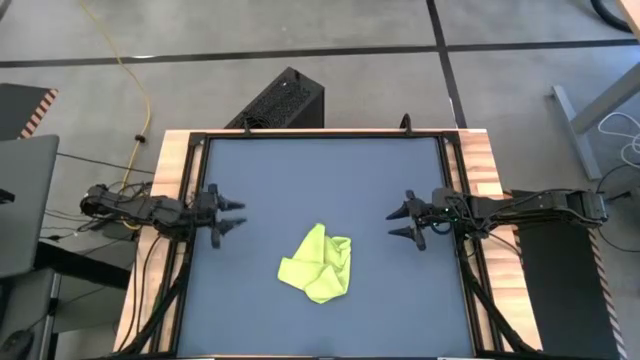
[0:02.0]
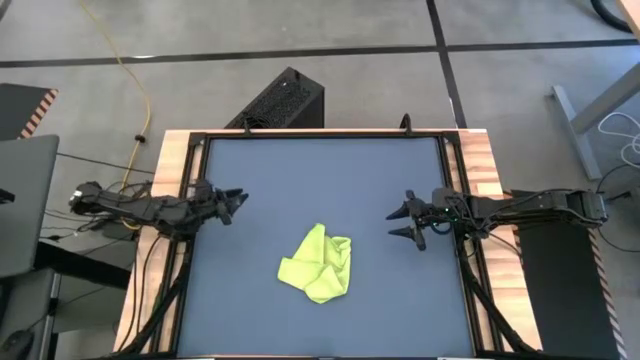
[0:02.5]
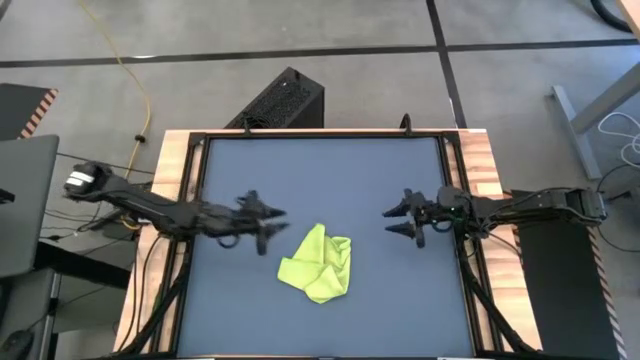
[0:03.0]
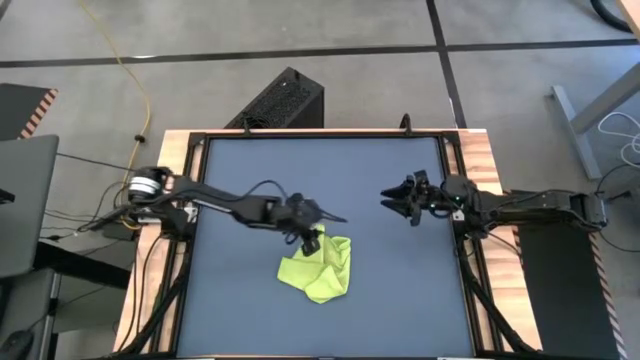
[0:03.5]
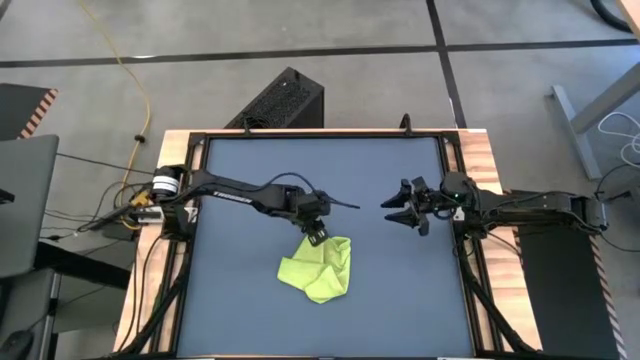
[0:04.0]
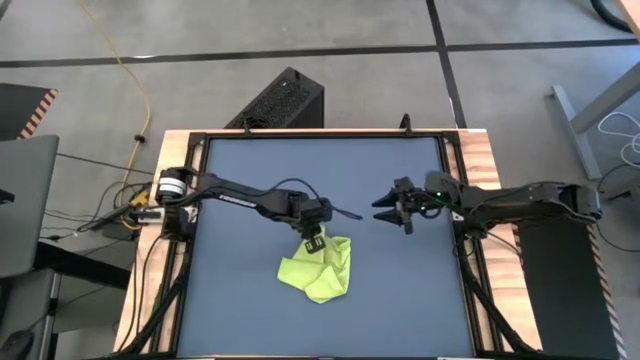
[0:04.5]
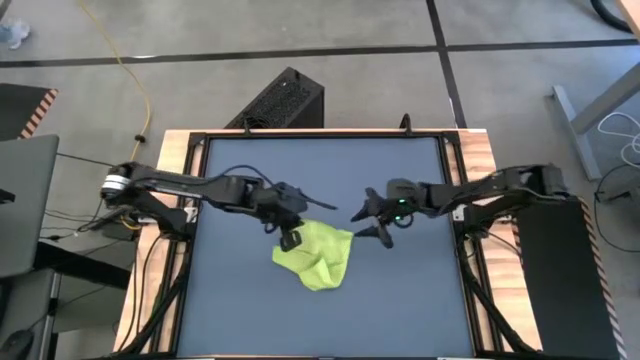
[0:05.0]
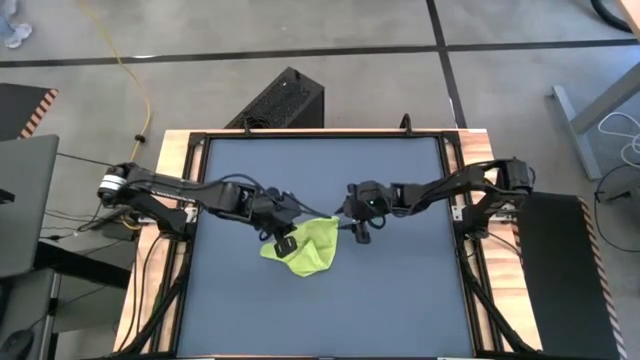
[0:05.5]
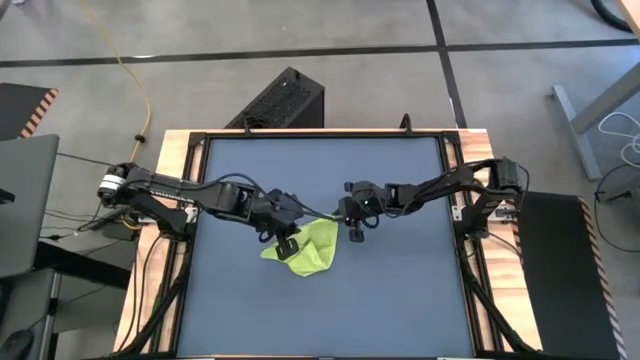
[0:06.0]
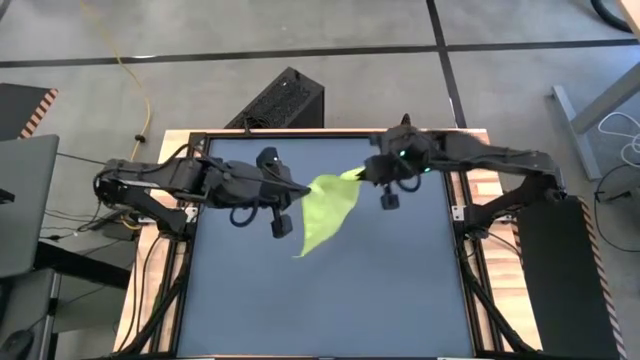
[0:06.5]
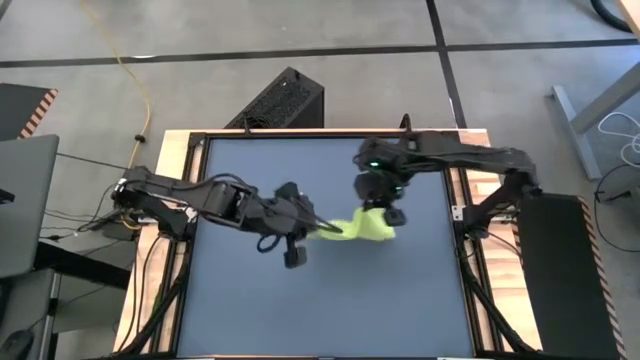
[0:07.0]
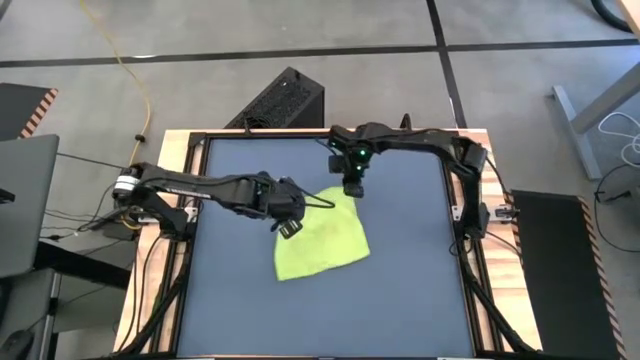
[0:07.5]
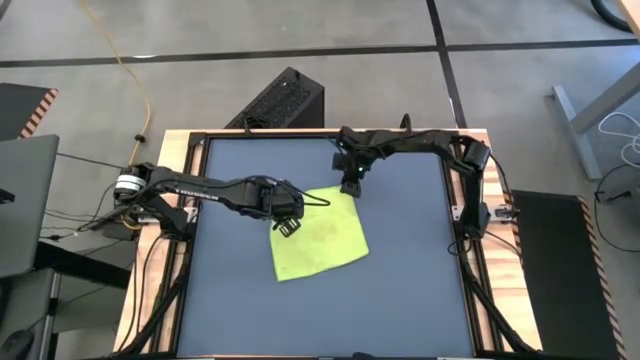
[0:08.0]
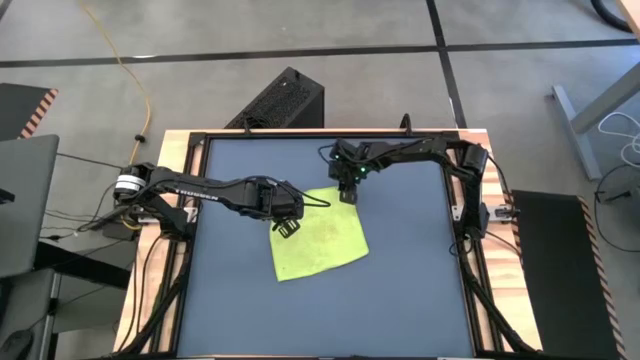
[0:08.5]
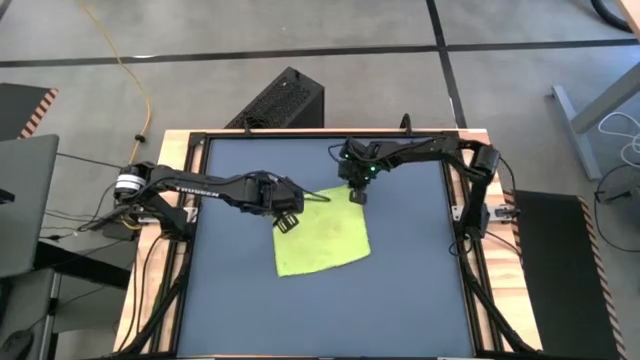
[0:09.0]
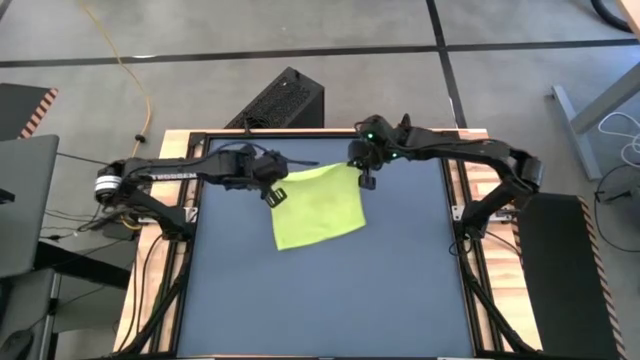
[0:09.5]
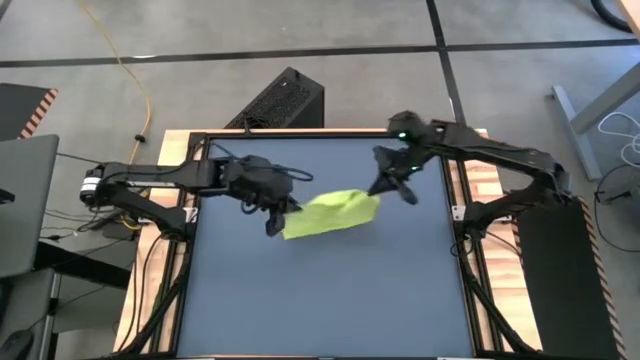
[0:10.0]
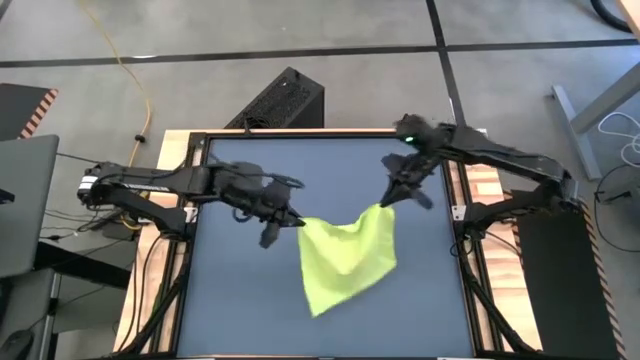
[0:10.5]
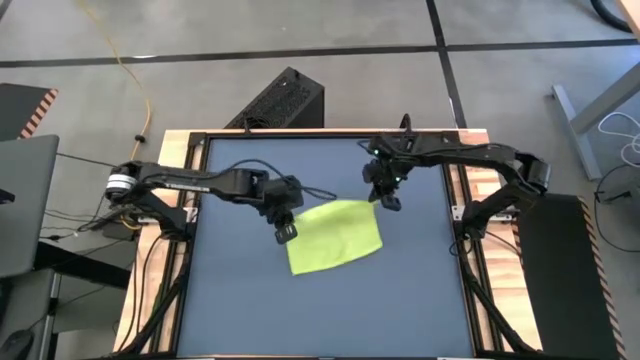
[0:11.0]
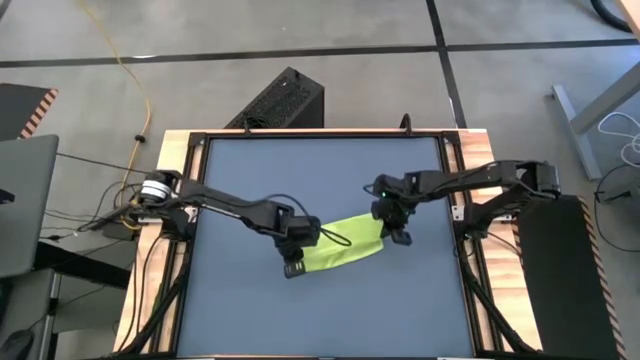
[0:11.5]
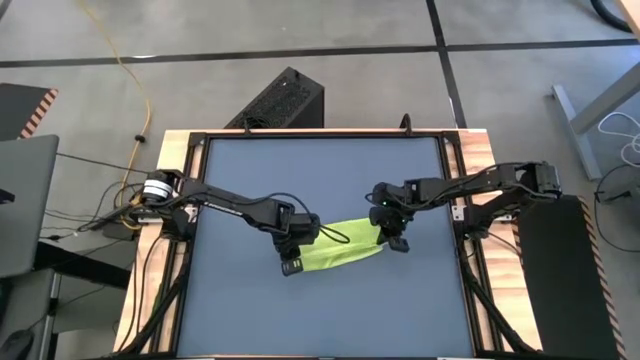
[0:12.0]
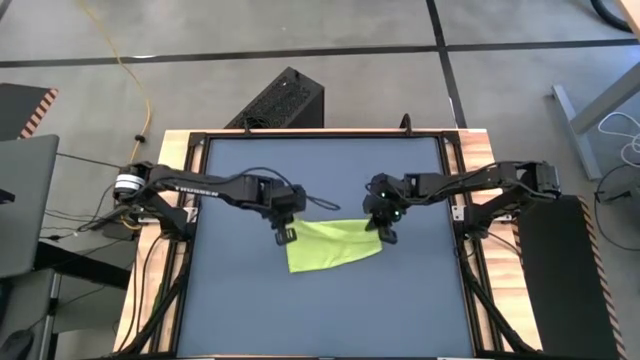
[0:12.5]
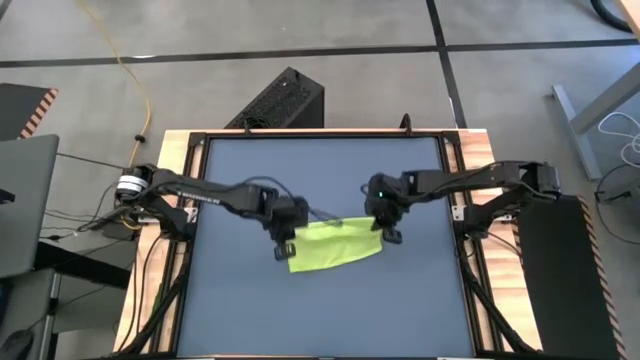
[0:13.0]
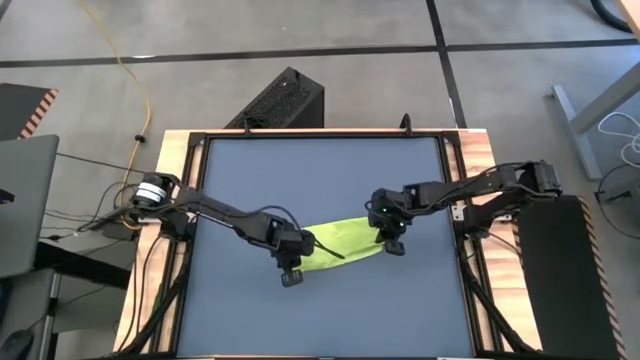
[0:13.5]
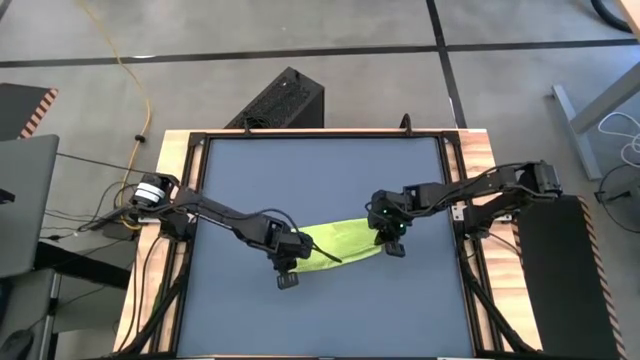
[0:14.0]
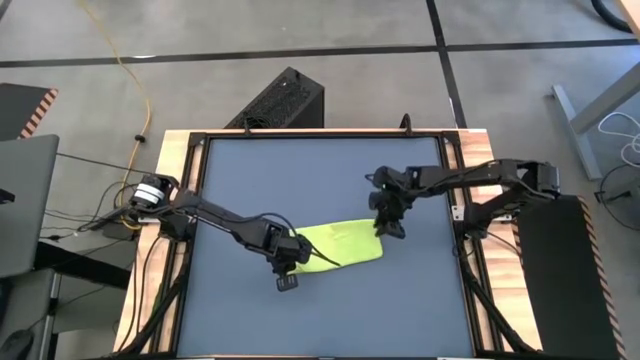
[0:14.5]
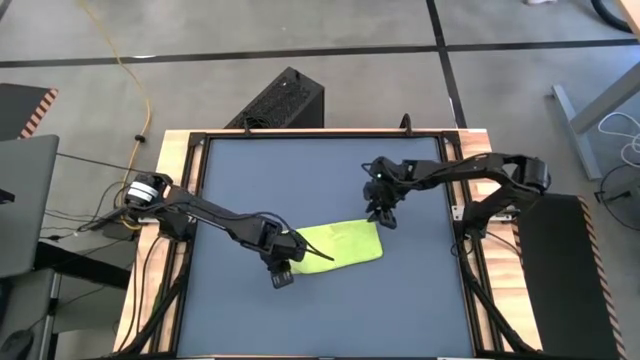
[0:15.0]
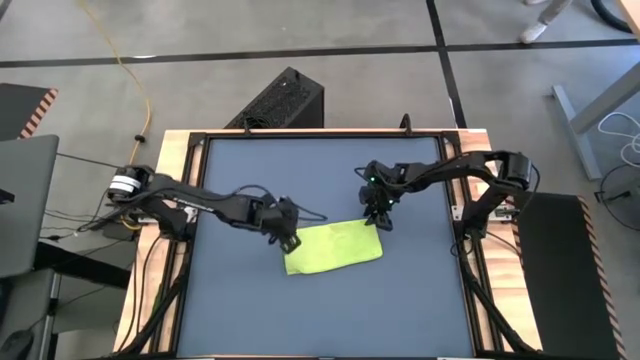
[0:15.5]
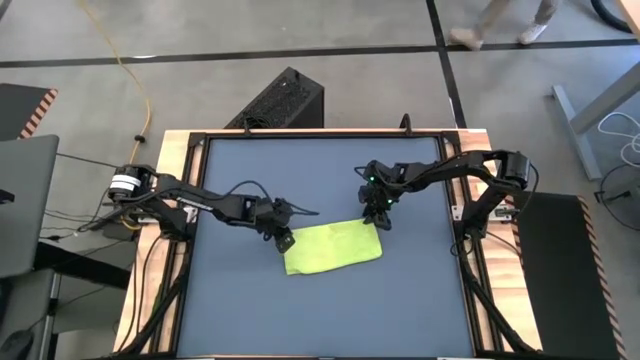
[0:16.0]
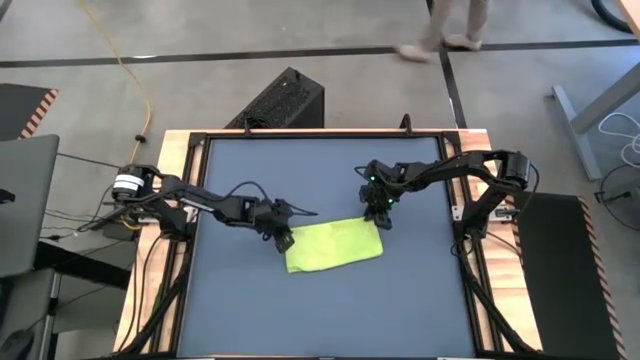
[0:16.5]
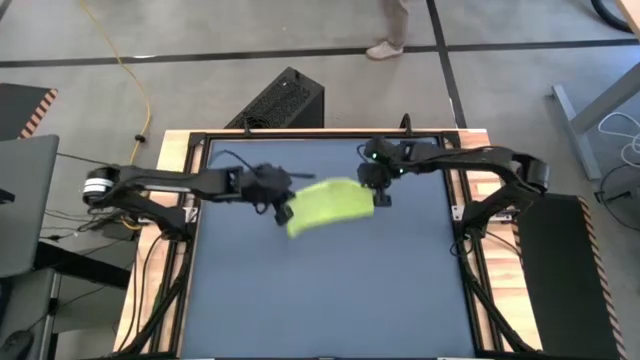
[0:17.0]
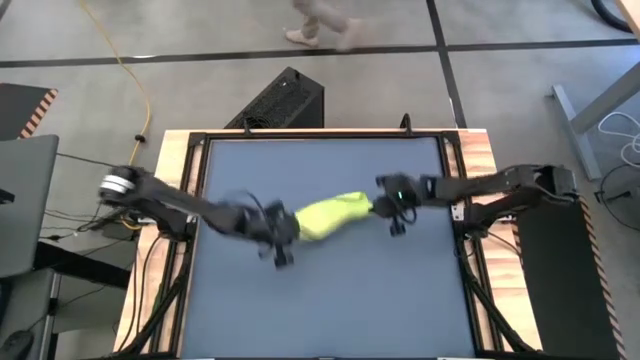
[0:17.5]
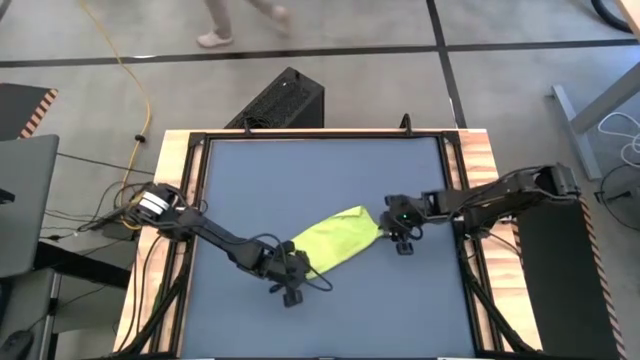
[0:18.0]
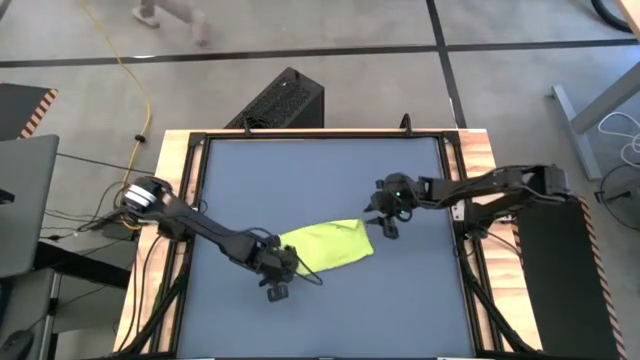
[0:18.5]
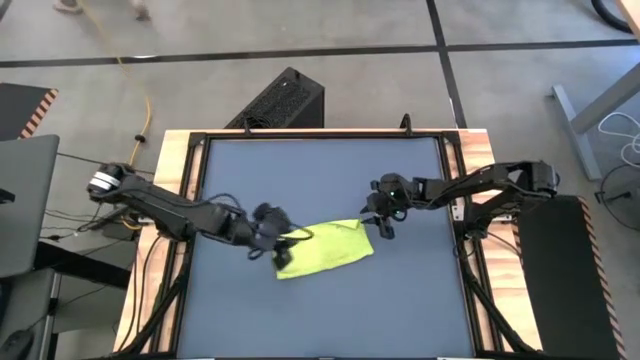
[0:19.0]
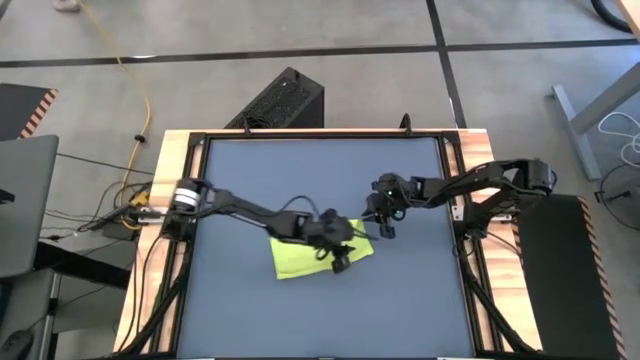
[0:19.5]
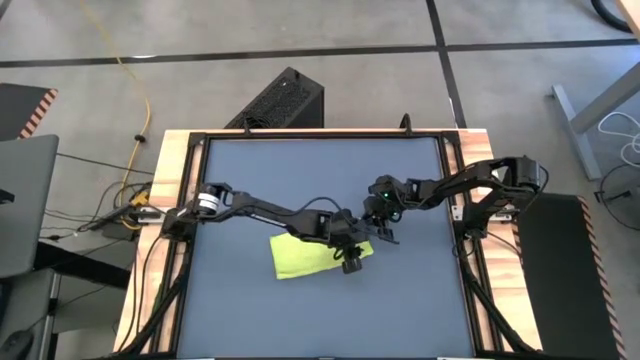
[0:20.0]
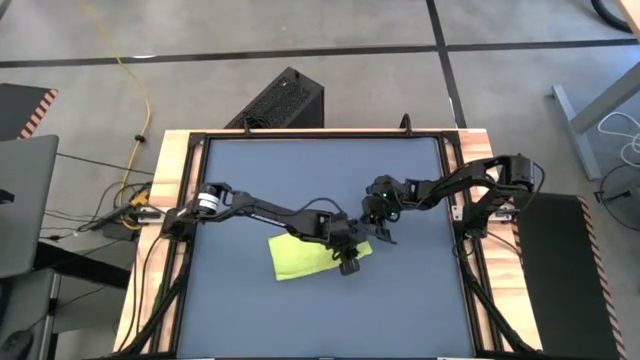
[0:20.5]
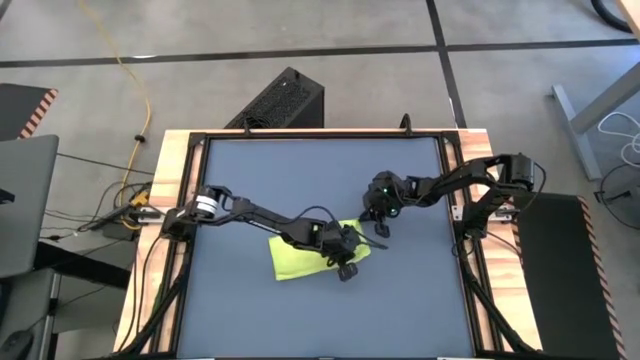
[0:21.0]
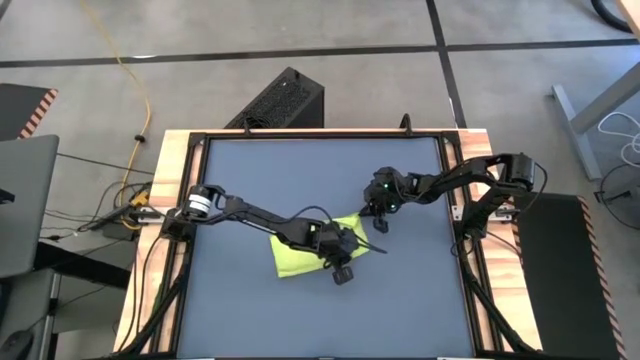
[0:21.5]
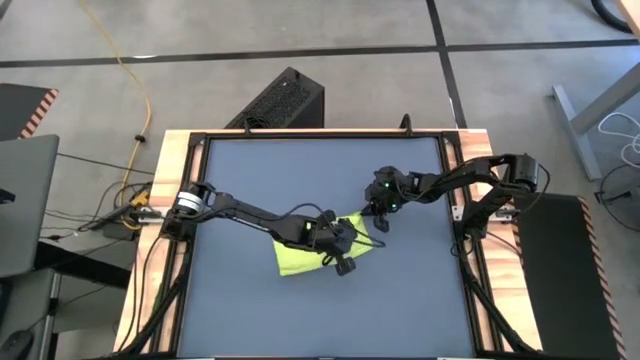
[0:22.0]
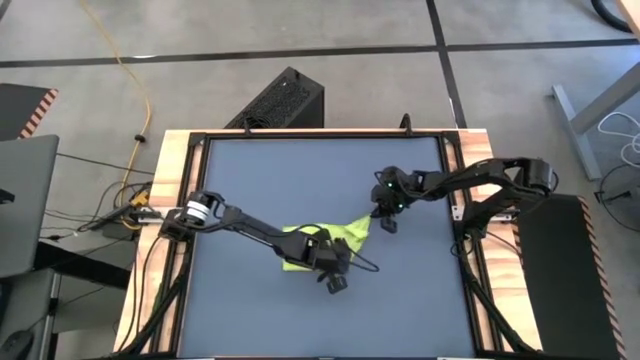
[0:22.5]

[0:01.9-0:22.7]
Task: Roll towel into tight, uniform cylinder
Roll the green towel
